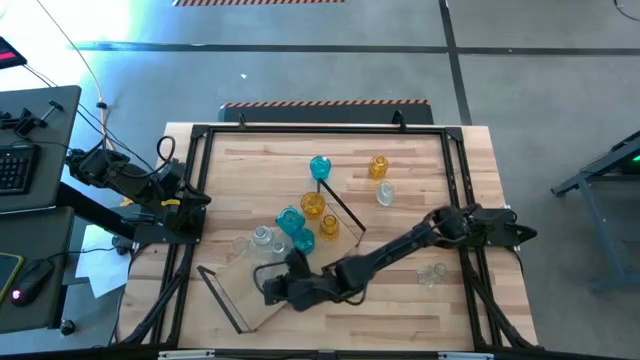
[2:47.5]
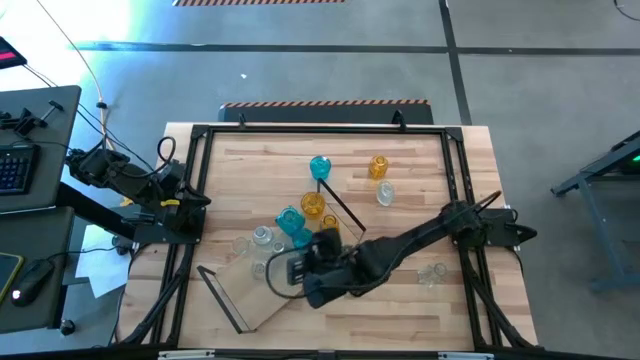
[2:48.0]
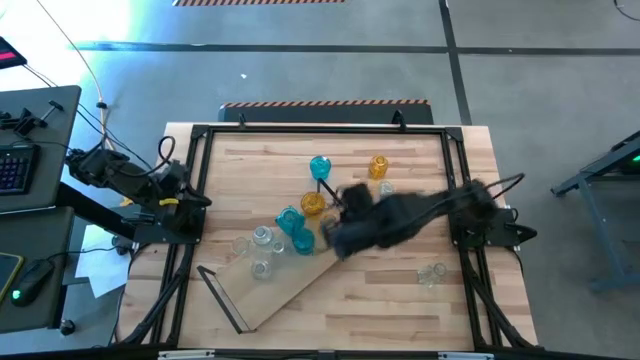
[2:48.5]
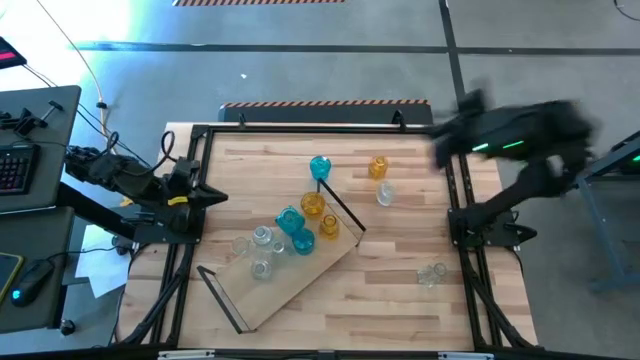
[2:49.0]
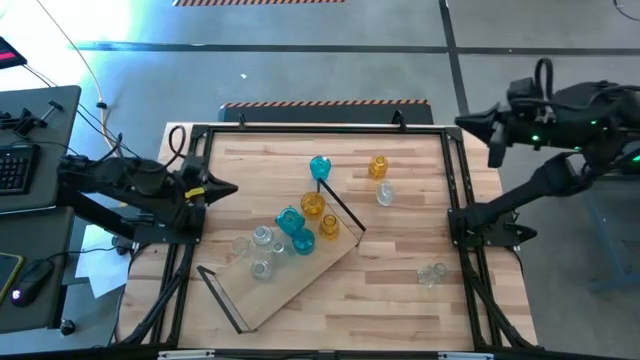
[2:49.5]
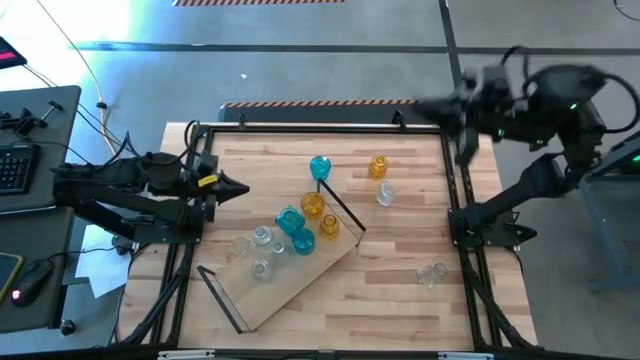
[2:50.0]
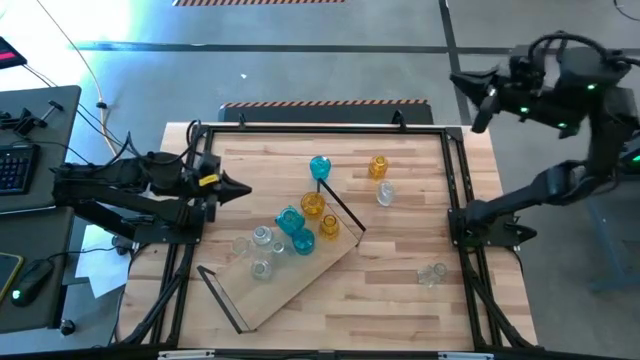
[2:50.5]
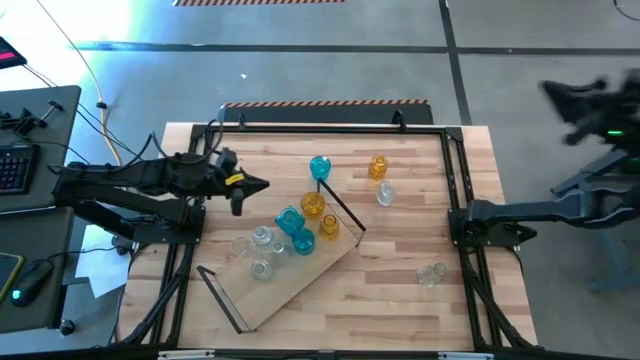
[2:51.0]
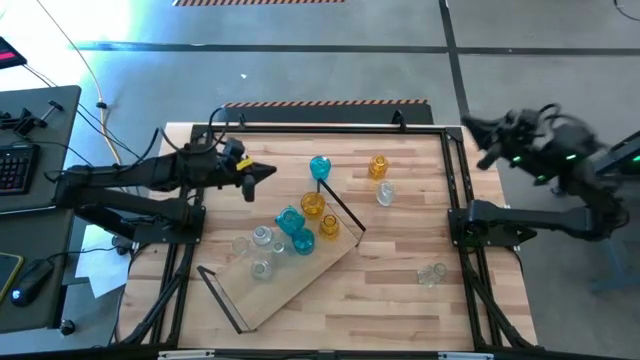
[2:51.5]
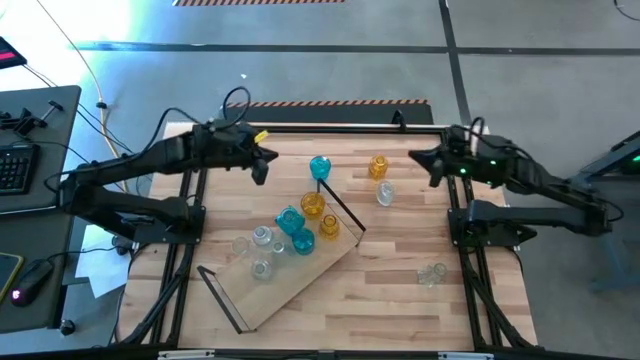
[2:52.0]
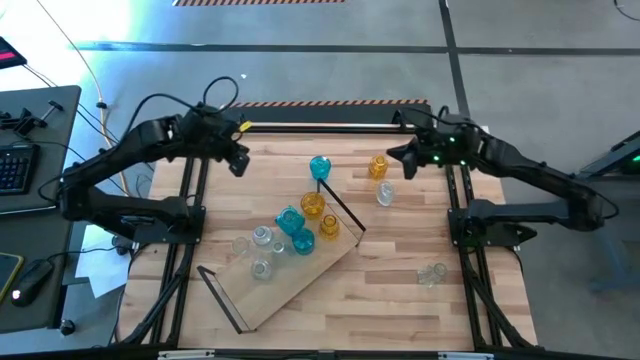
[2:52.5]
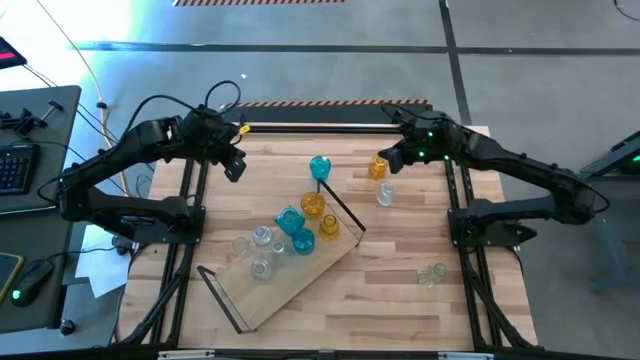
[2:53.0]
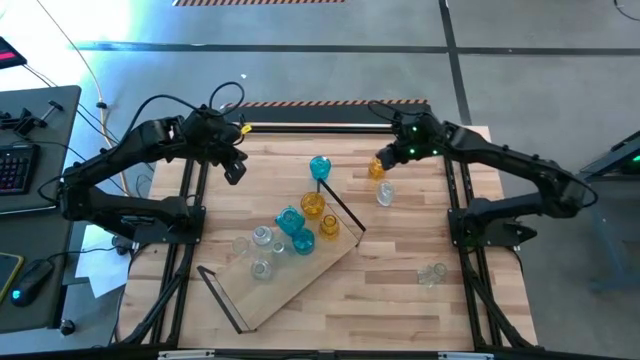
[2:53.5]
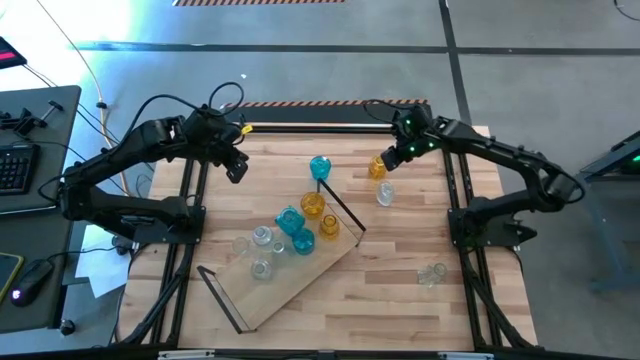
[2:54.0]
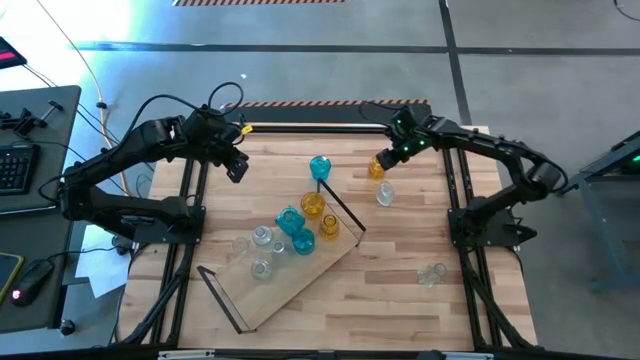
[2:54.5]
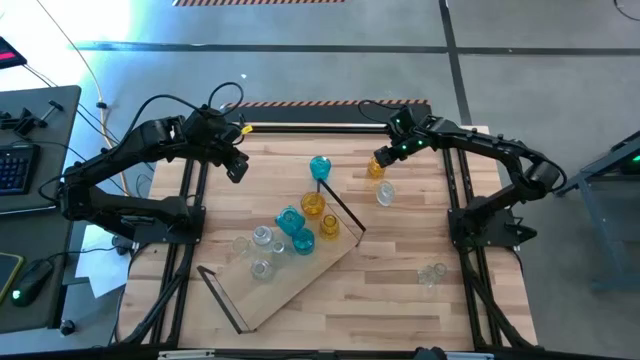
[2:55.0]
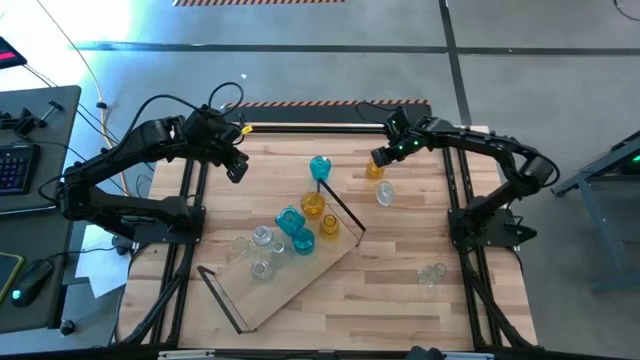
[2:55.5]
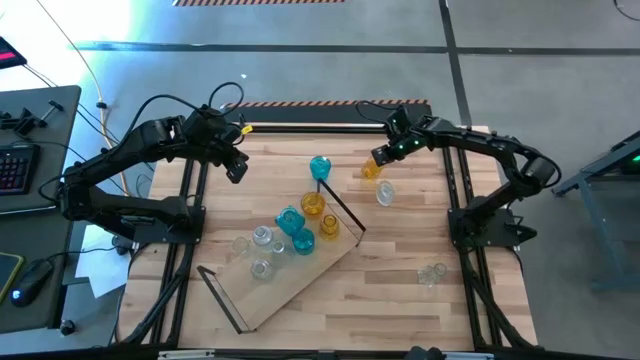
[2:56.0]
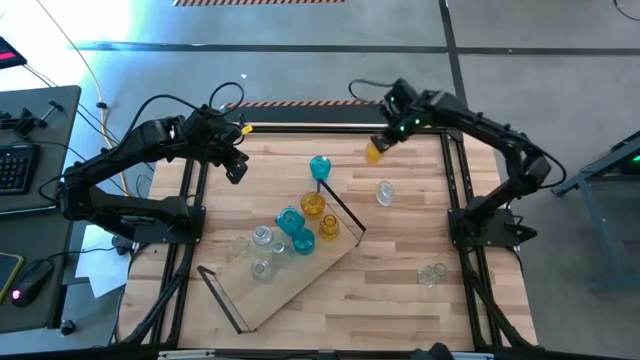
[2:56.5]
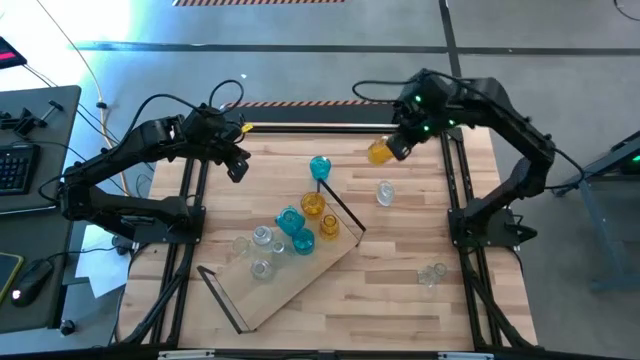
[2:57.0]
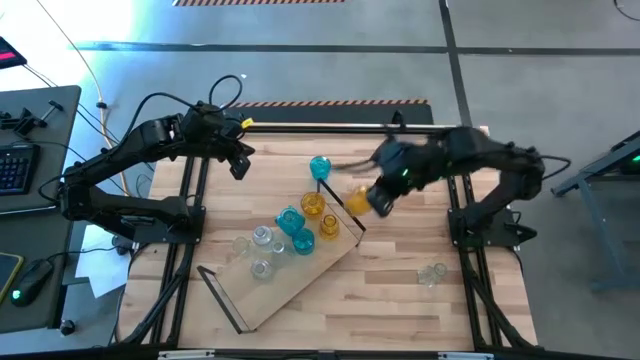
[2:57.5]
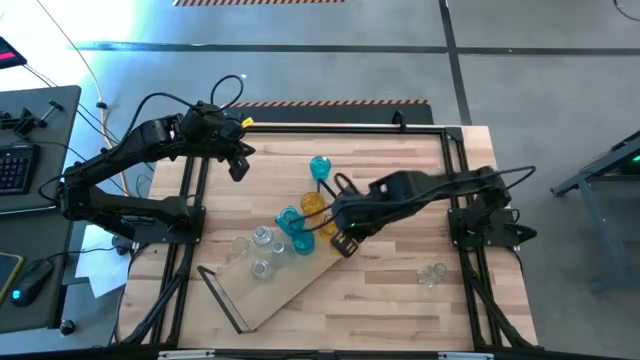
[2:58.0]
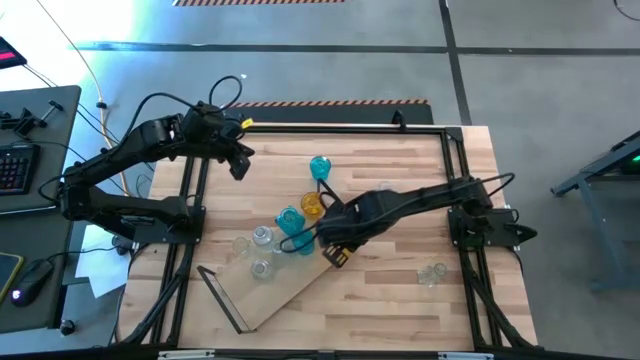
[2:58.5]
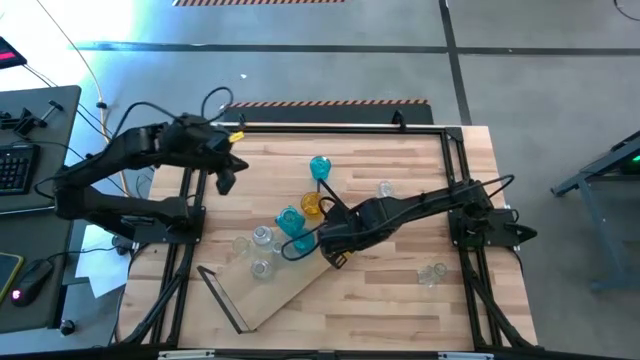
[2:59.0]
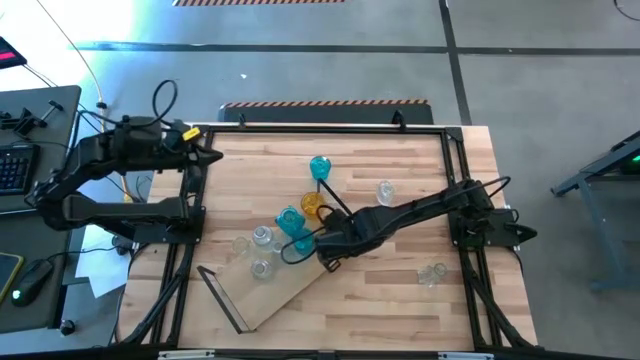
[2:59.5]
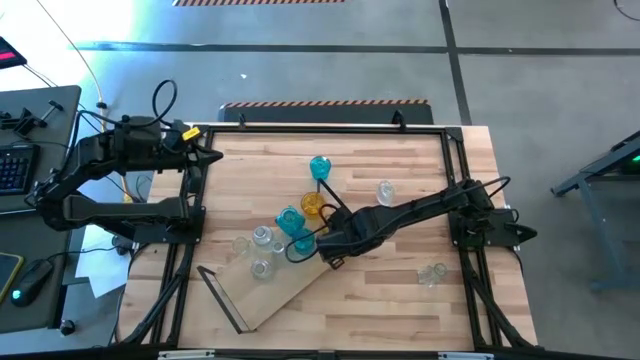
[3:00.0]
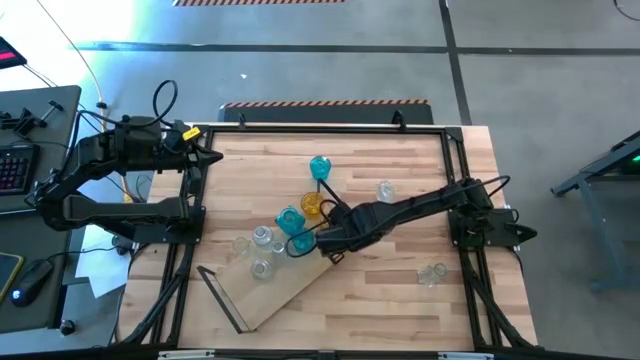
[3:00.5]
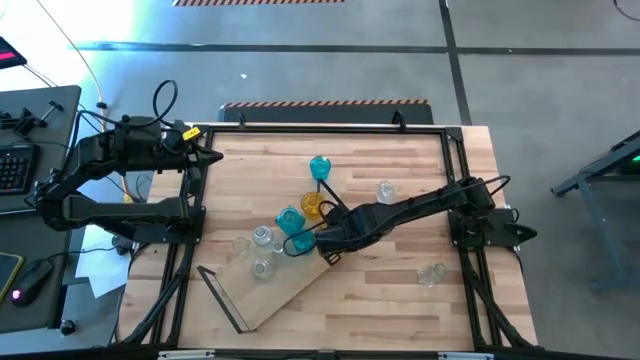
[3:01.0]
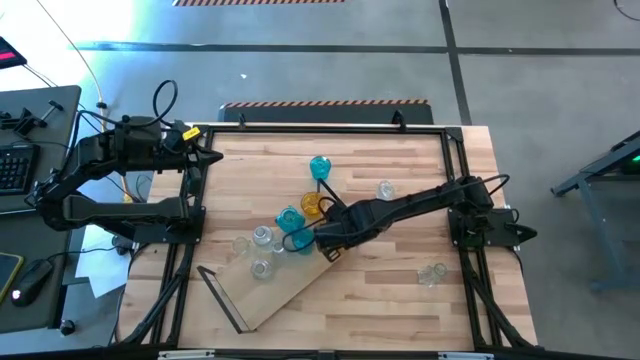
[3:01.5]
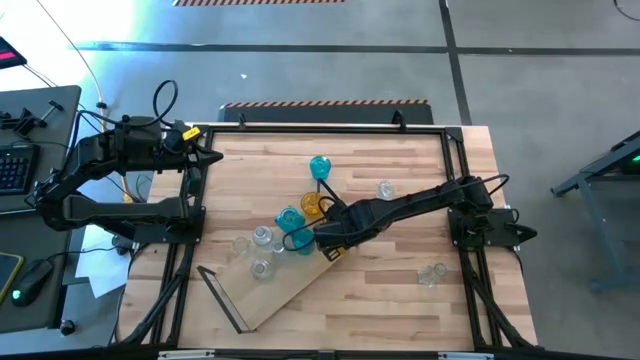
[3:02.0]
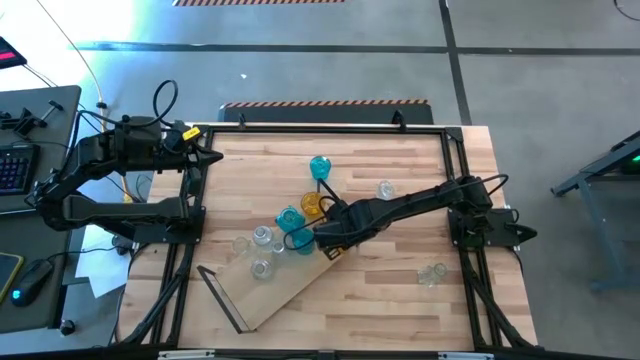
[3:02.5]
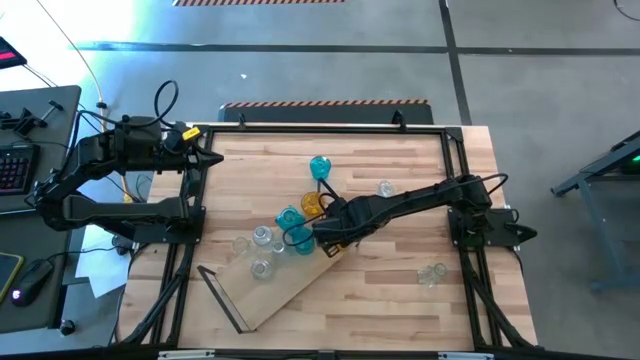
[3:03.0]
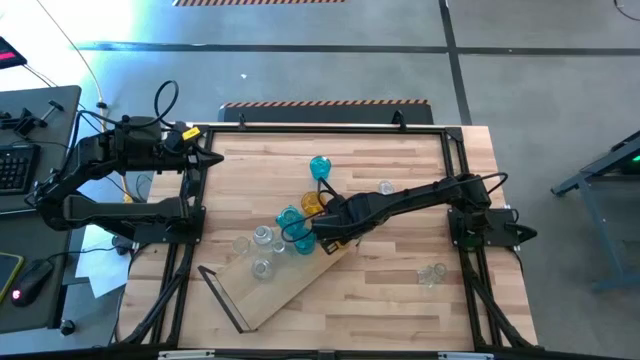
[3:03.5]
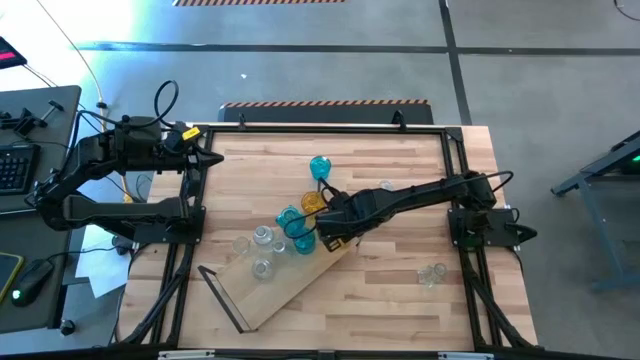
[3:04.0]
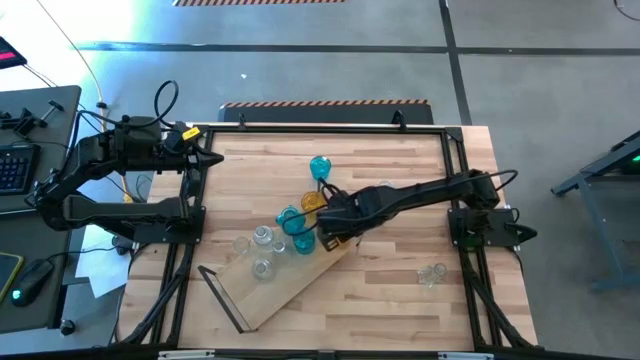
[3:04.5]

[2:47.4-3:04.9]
Task: sort vases onto shelf
Put the yellow vase on the shelf aligned with the other yellow vases

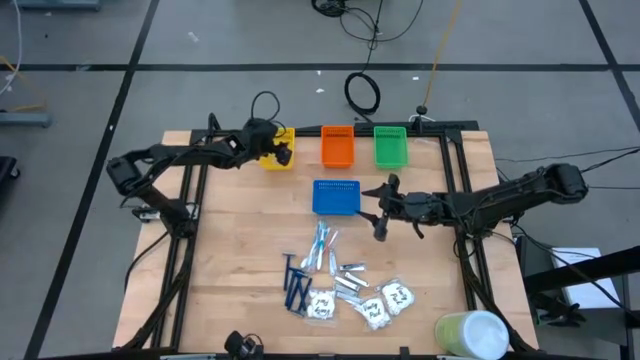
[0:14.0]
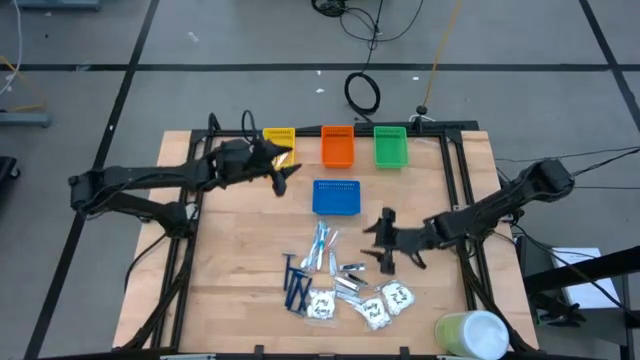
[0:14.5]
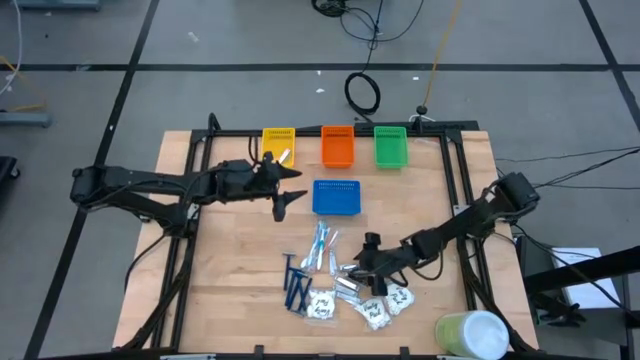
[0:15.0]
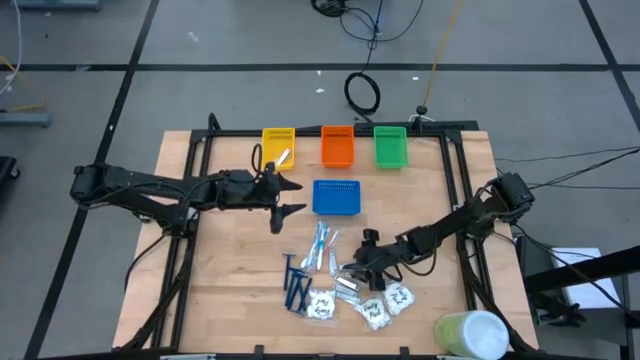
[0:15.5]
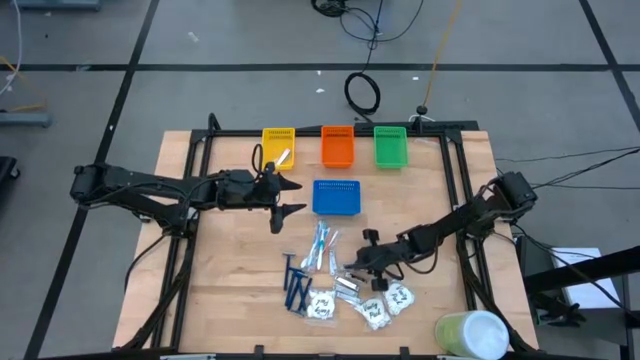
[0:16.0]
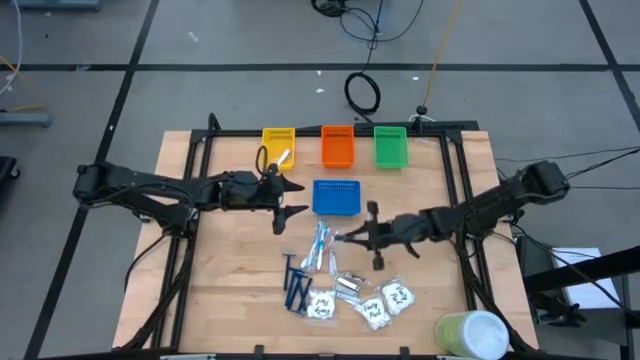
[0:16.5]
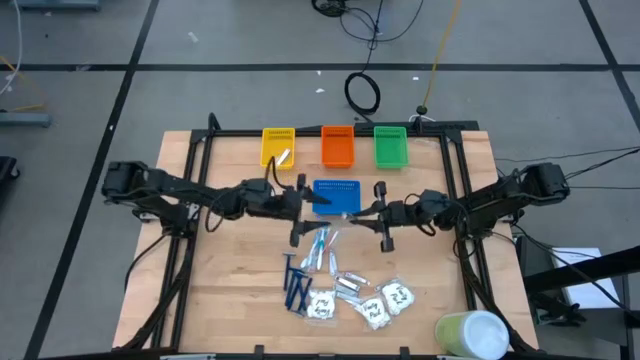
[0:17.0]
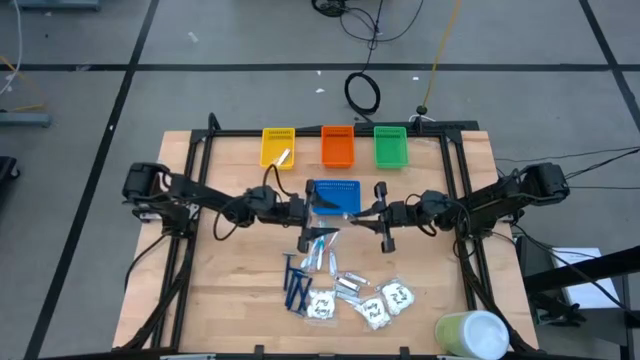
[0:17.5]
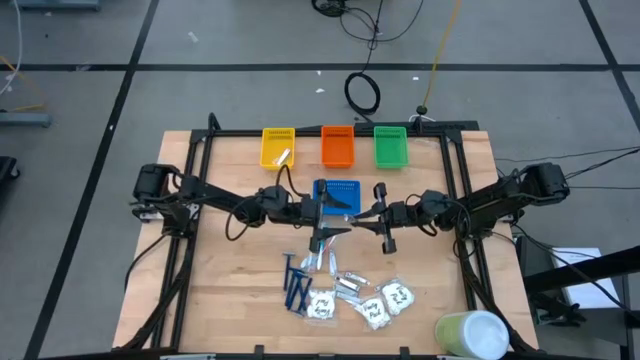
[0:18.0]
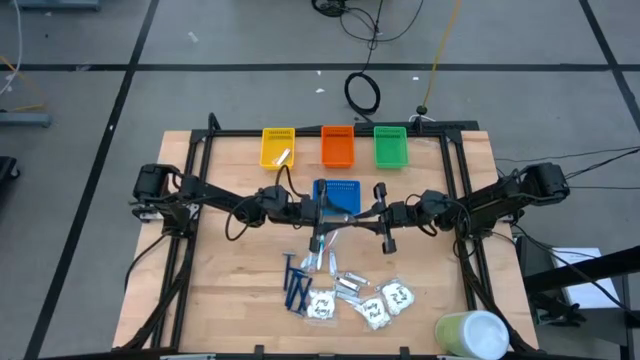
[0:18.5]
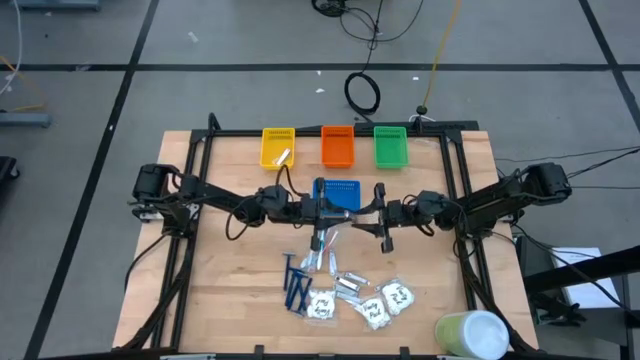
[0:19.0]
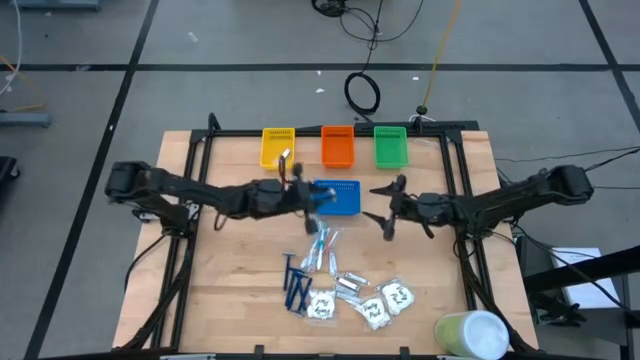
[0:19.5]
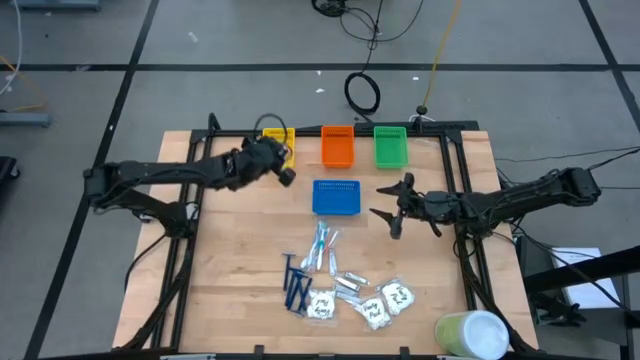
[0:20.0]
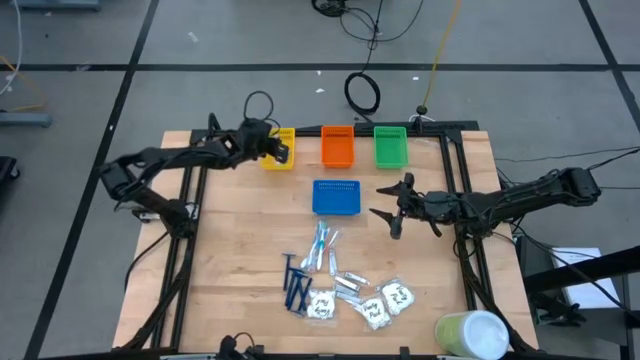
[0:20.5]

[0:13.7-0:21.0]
Task: Pick & Place Travel size toiletries
Put the silver nail cutter into the yellow basket
